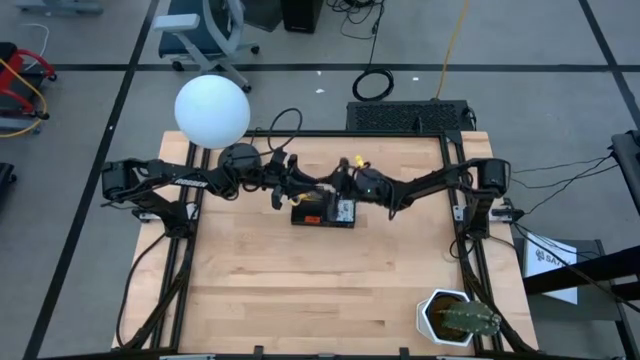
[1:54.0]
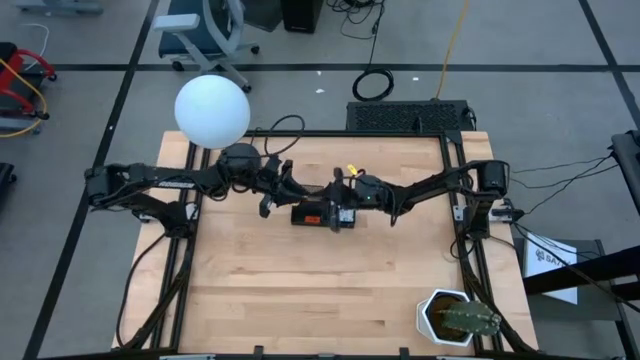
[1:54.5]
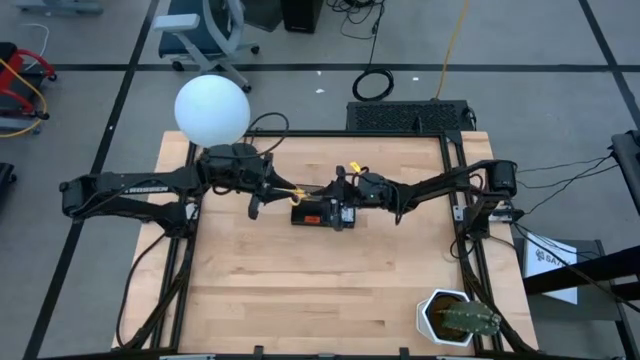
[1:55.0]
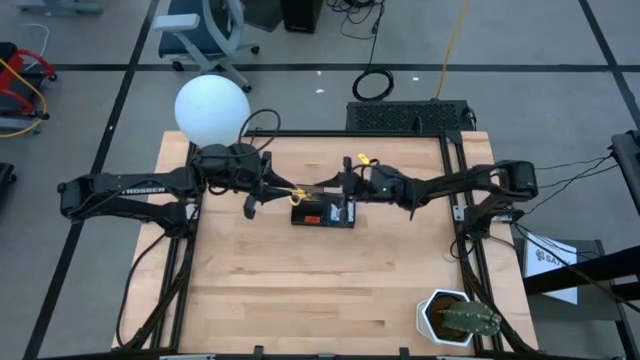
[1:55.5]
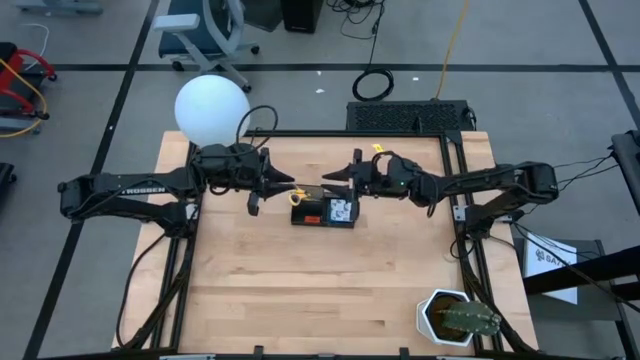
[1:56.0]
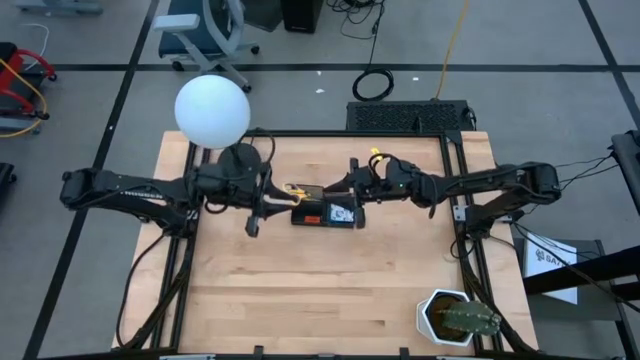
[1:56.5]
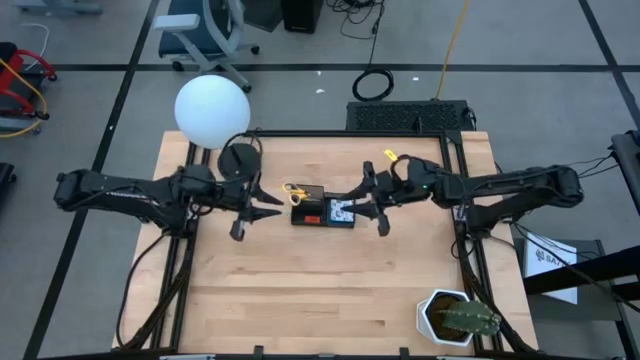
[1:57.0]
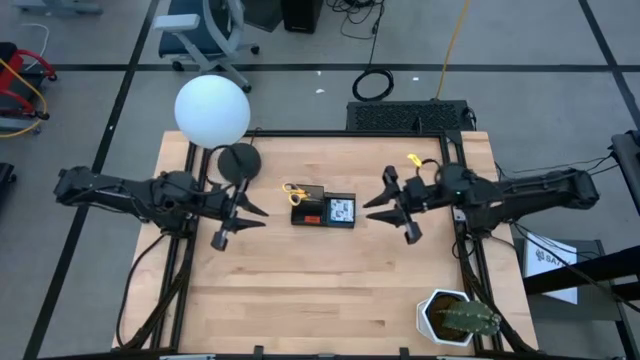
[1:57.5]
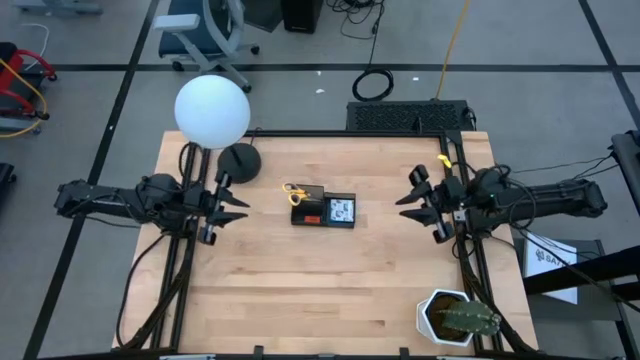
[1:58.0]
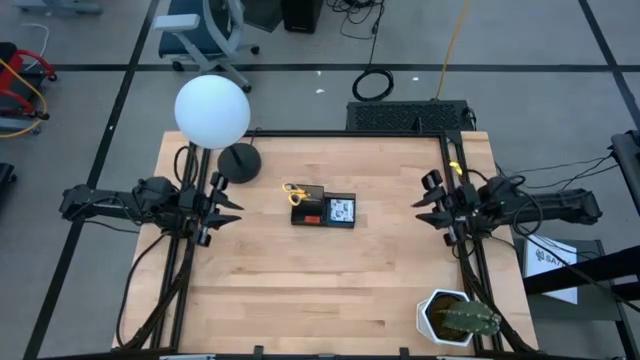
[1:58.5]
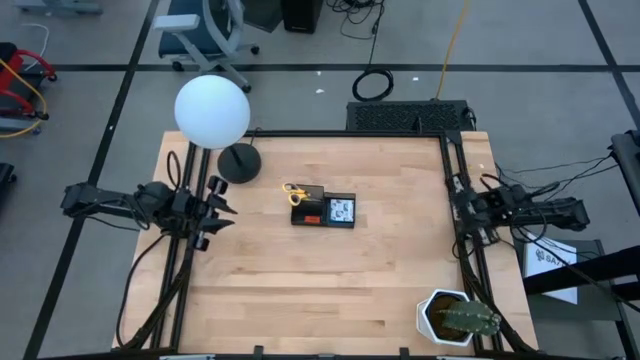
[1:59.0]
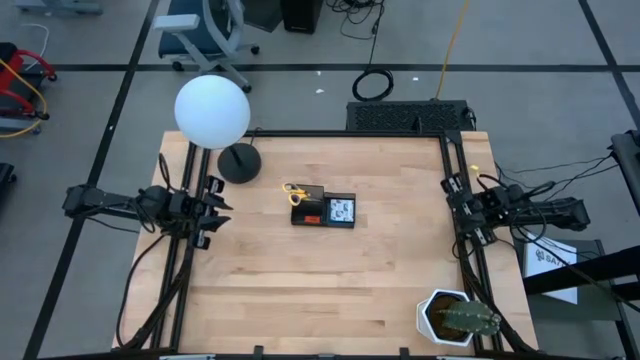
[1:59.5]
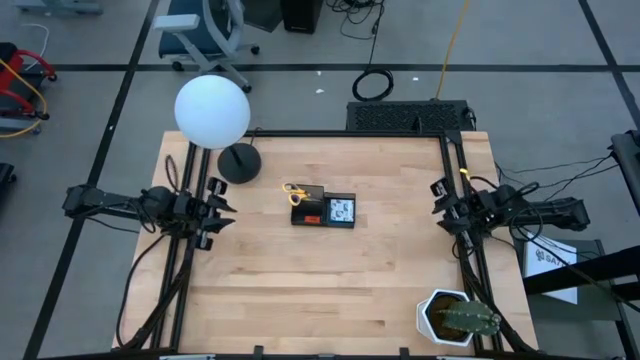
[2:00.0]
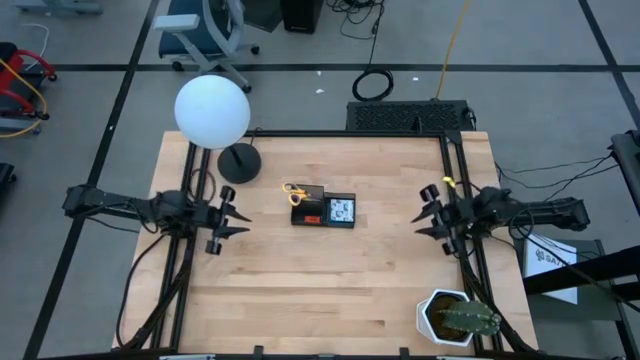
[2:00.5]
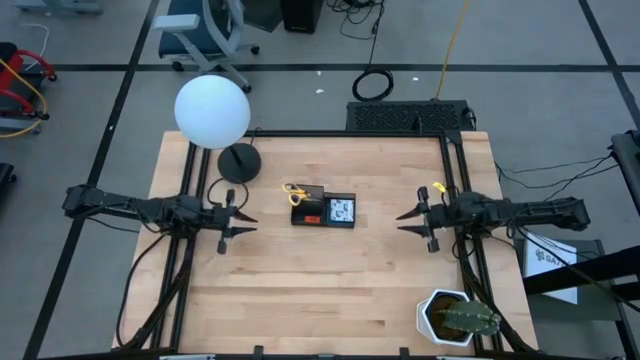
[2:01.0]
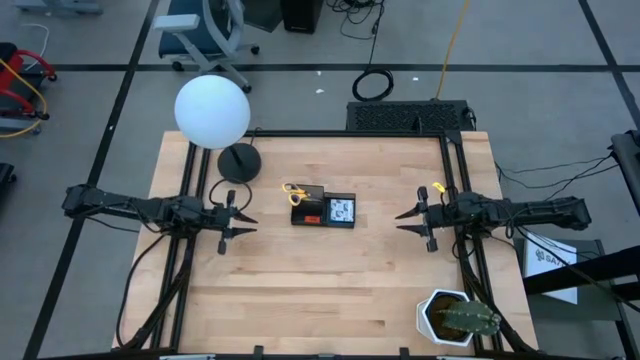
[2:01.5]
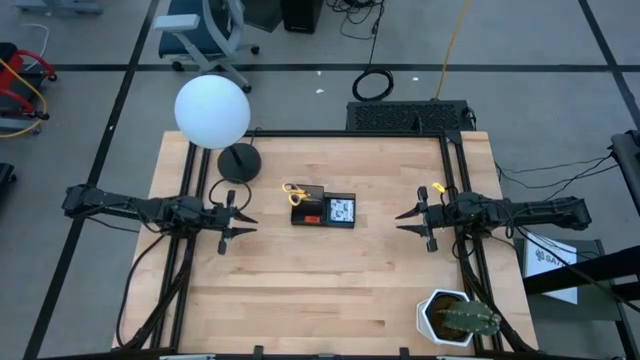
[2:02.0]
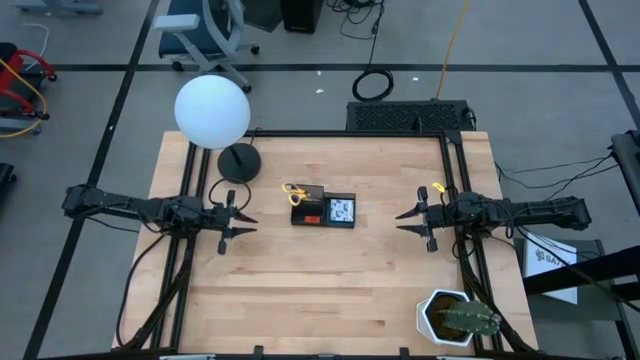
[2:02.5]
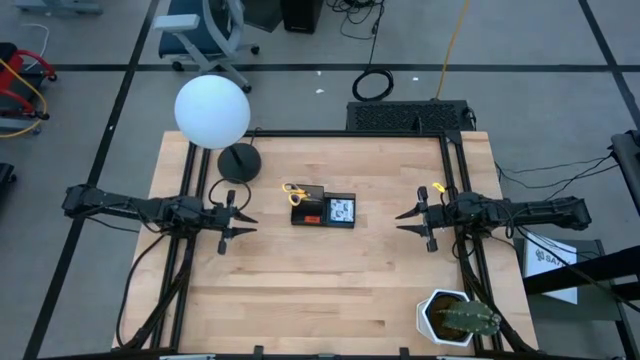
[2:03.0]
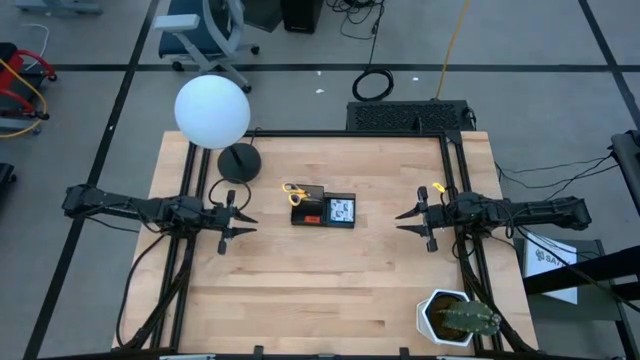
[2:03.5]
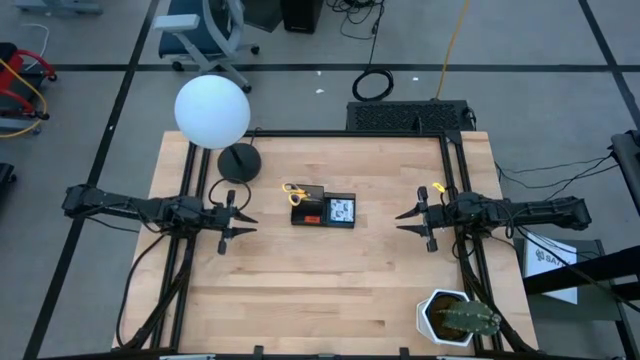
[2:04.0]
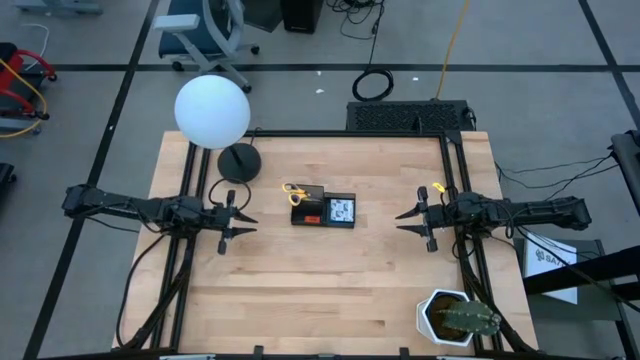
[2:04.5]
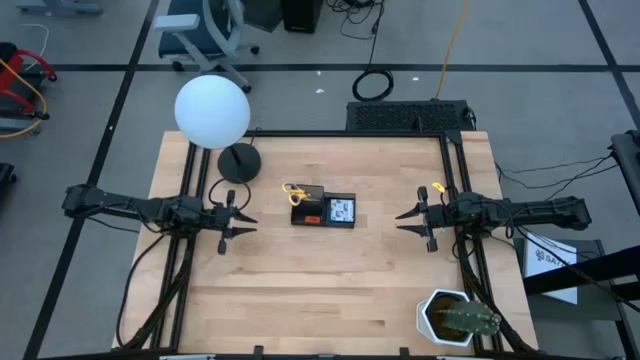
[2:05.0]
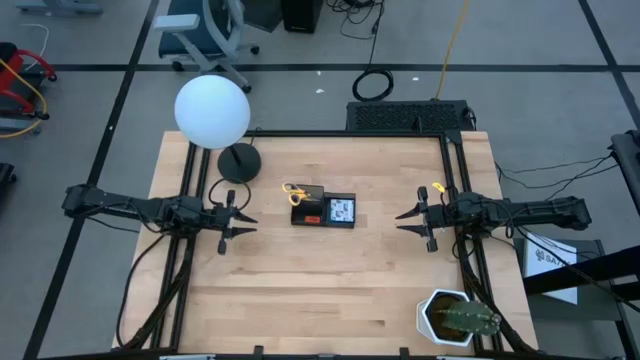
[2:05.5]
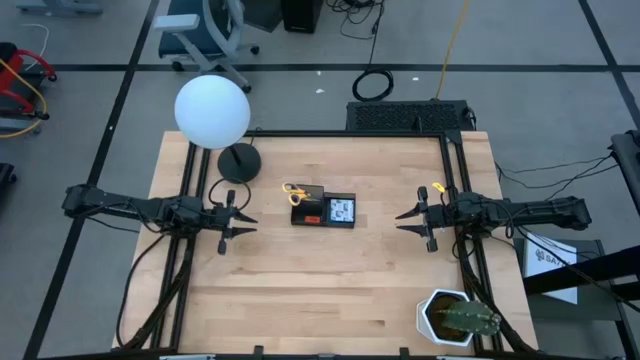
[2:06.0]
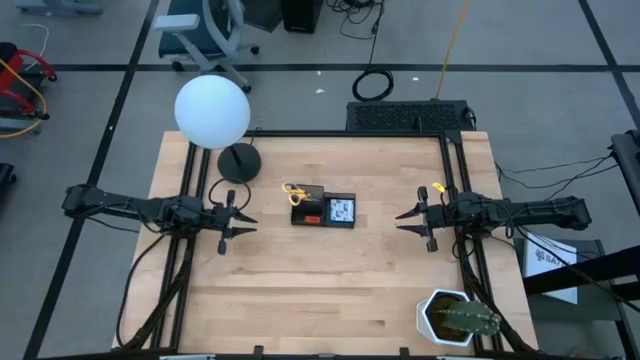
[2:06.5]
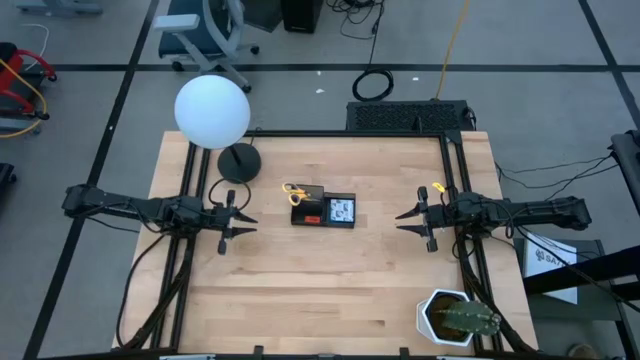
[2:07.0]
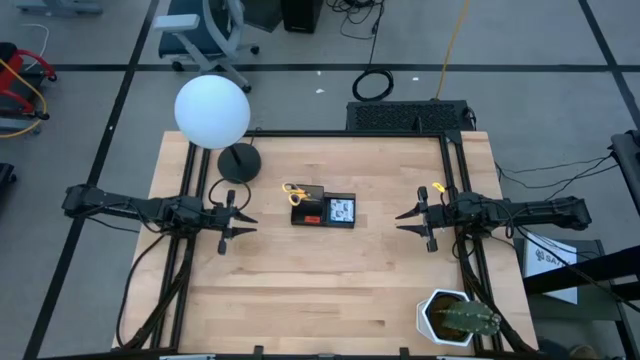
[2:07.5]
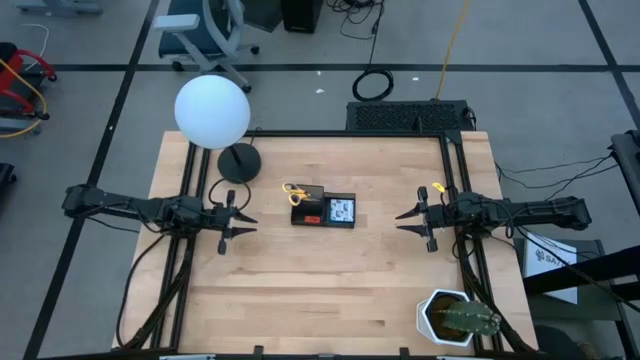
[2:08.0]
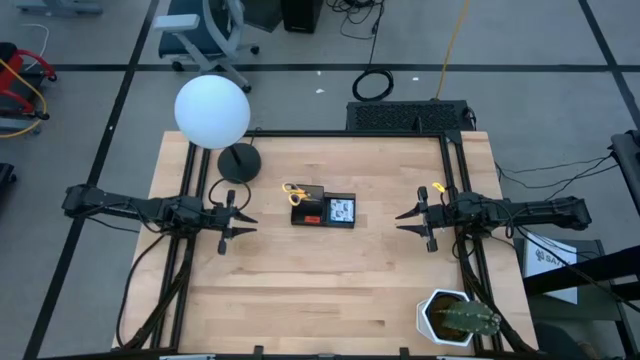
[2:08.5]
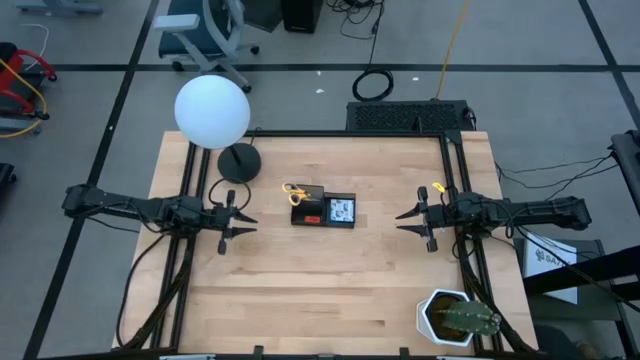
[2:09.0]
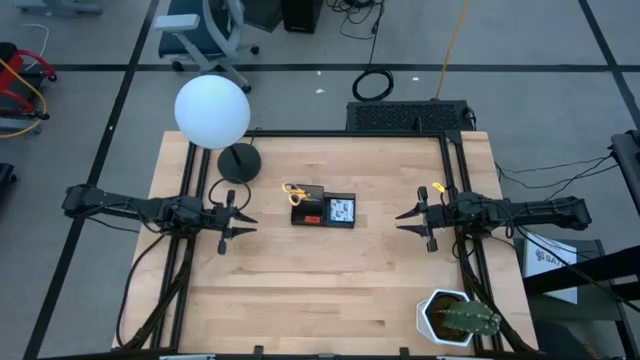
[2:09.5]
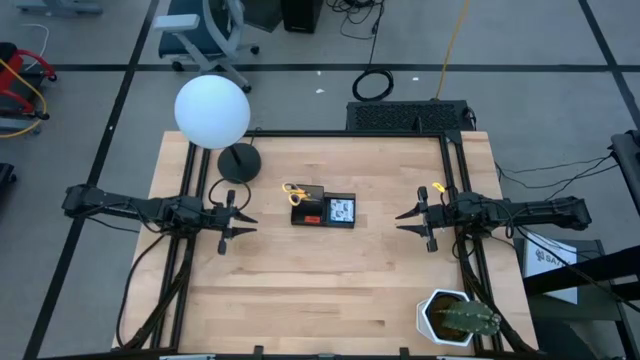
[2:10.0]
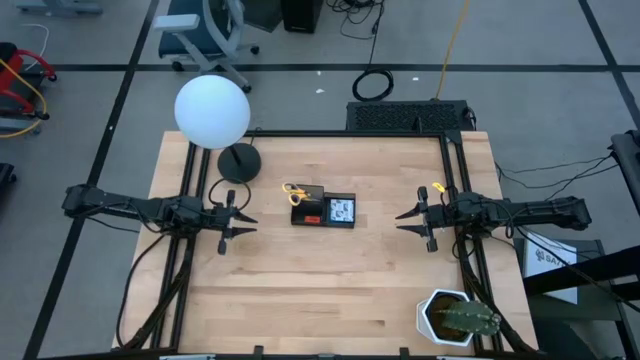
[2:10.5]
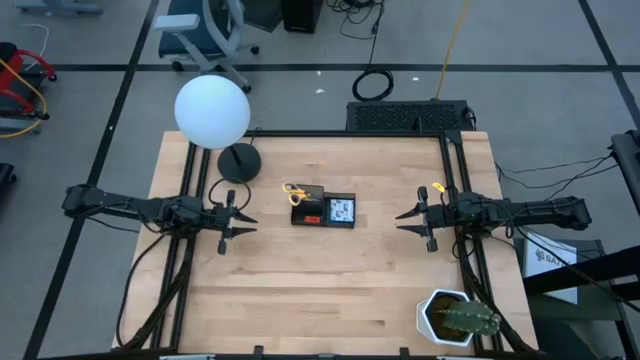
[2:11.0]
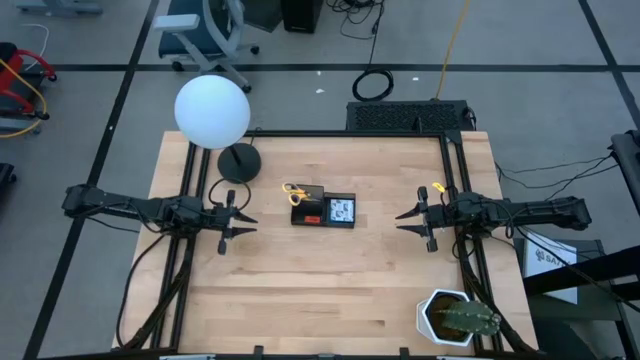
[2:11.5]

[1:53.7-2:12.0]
Task: Pick and place office supplies into organizer
Return to Home Position

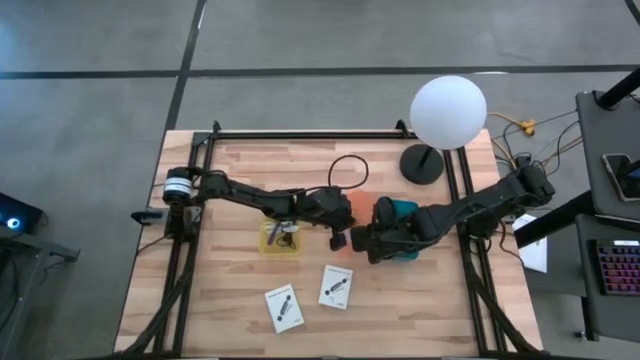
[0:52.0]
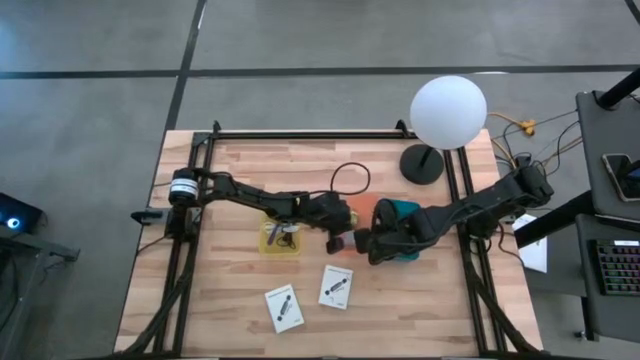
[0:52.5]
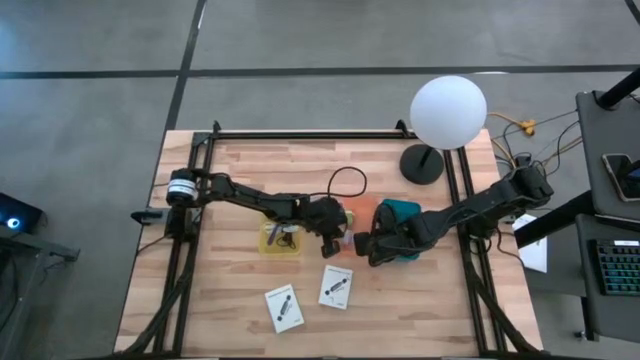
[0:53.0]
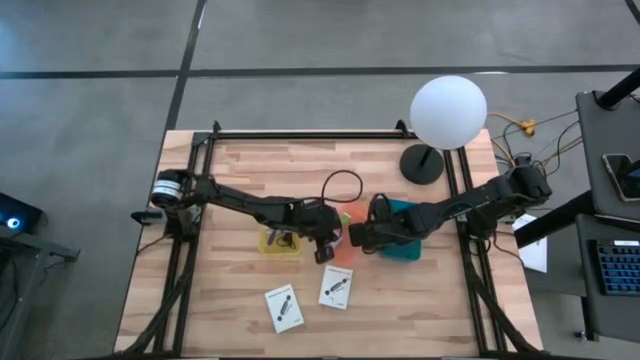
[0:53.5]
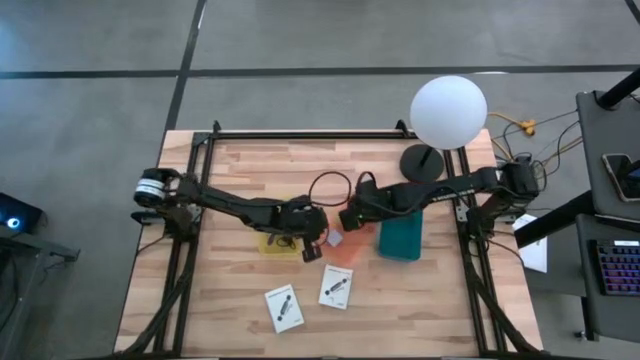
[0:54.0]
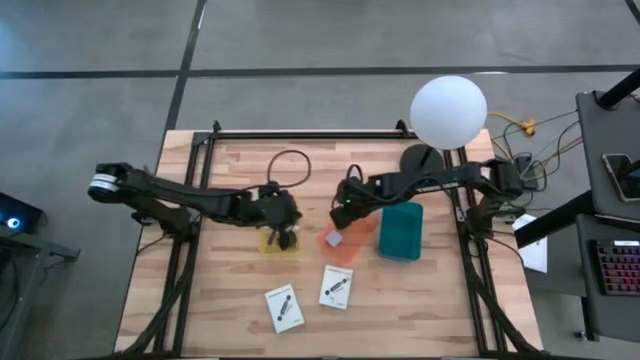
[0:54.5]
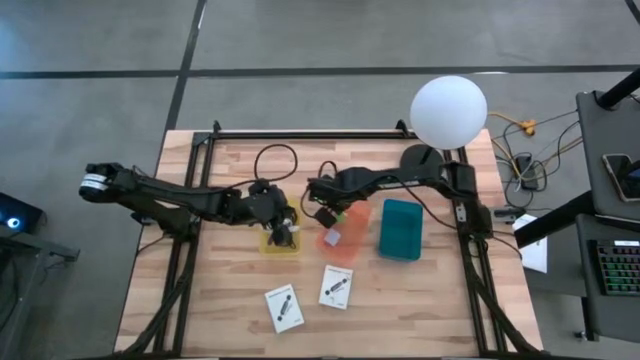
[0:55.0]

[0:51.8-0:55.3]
Task: Pick and place items into bin
Adjust the orange bin
